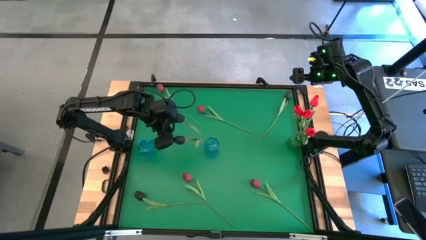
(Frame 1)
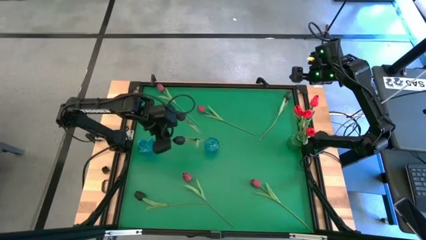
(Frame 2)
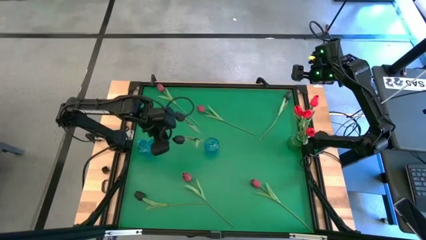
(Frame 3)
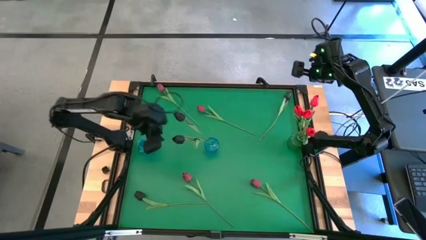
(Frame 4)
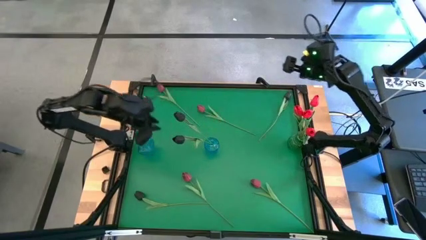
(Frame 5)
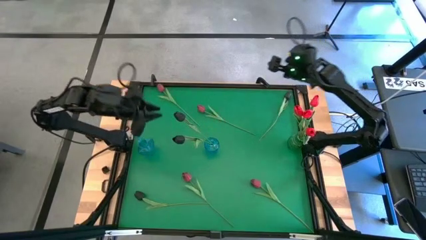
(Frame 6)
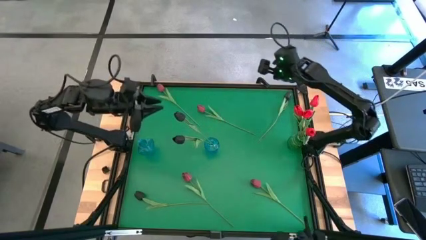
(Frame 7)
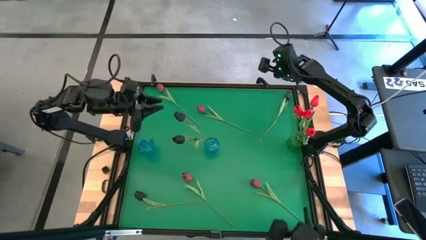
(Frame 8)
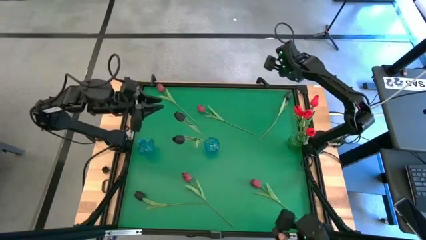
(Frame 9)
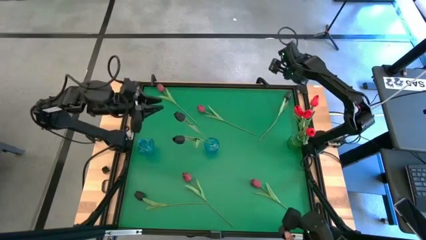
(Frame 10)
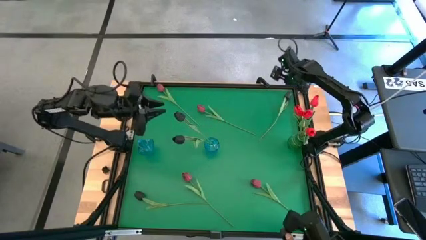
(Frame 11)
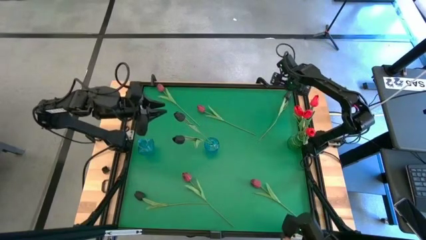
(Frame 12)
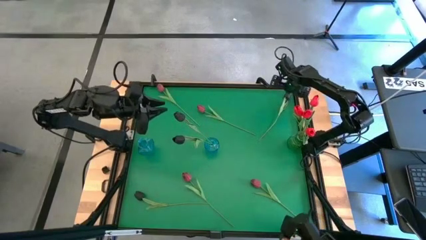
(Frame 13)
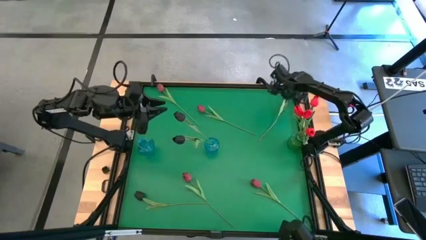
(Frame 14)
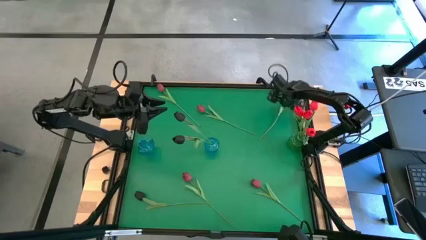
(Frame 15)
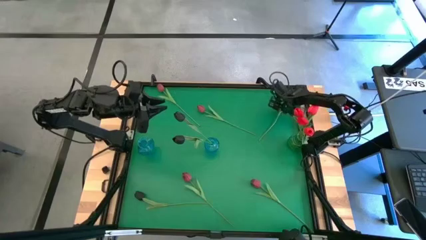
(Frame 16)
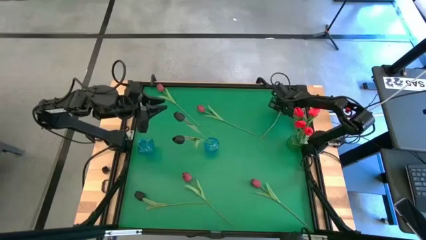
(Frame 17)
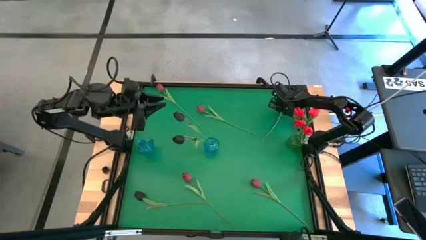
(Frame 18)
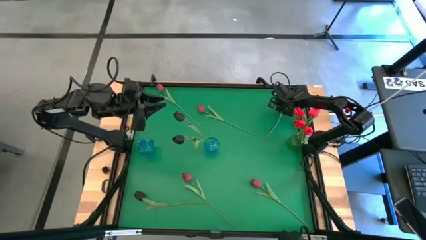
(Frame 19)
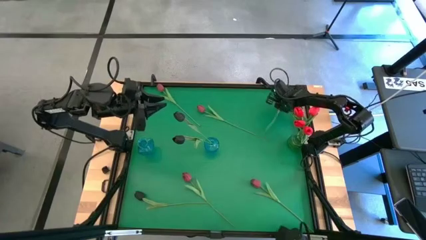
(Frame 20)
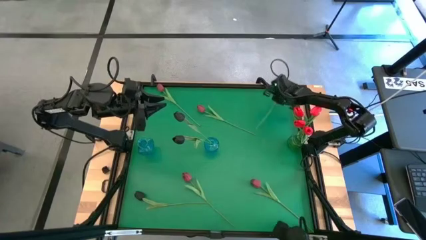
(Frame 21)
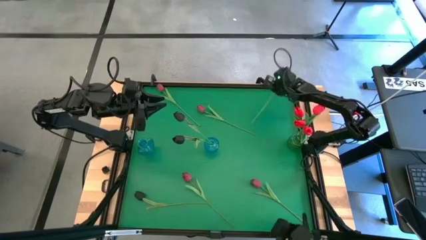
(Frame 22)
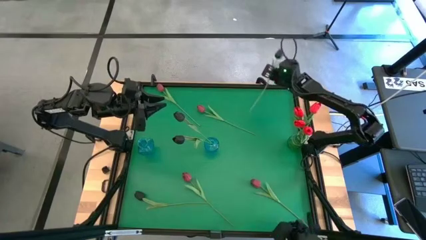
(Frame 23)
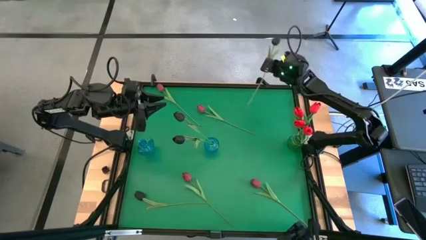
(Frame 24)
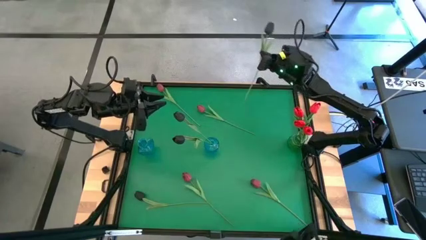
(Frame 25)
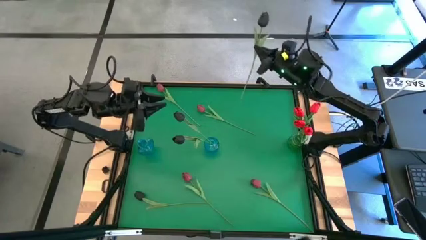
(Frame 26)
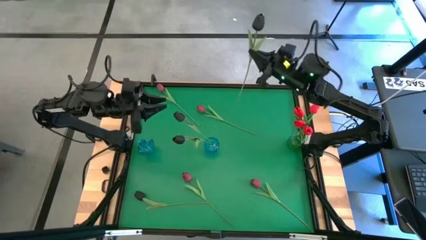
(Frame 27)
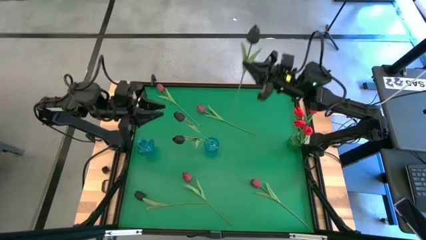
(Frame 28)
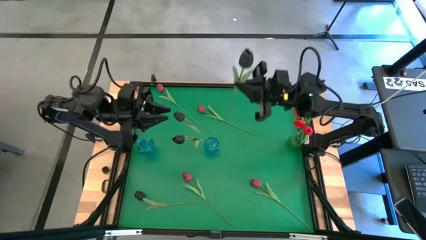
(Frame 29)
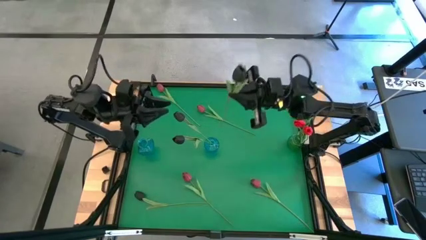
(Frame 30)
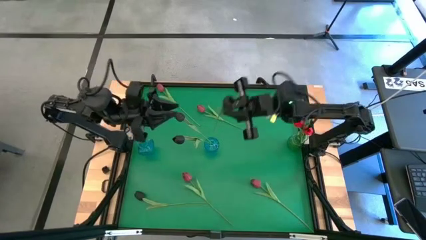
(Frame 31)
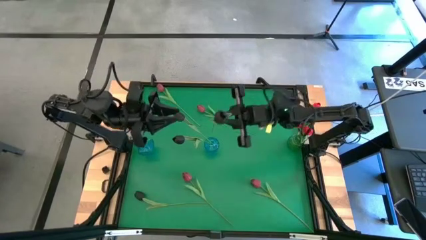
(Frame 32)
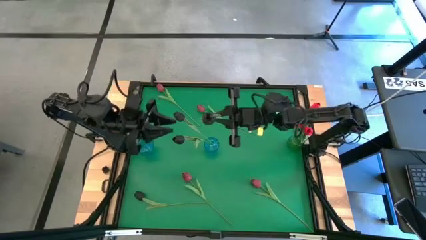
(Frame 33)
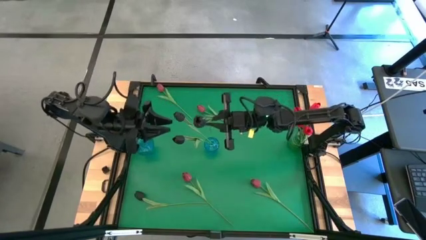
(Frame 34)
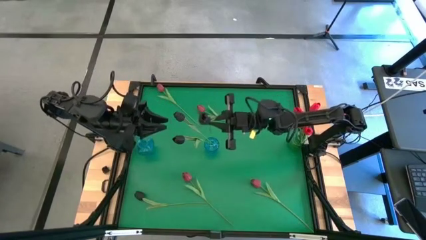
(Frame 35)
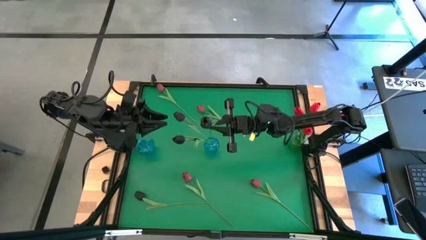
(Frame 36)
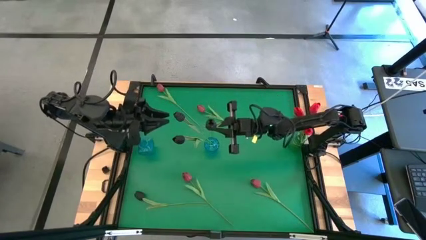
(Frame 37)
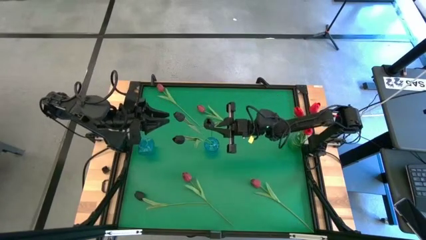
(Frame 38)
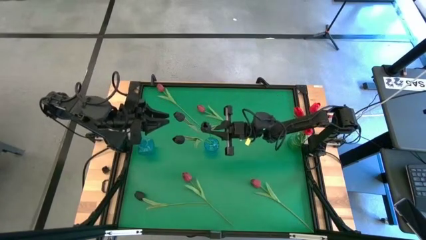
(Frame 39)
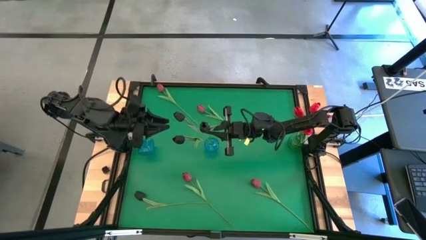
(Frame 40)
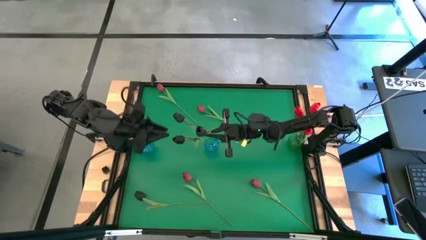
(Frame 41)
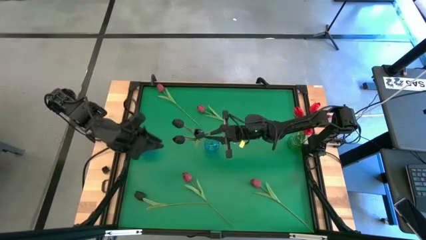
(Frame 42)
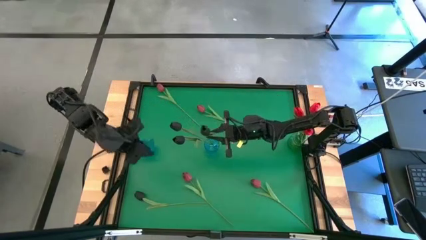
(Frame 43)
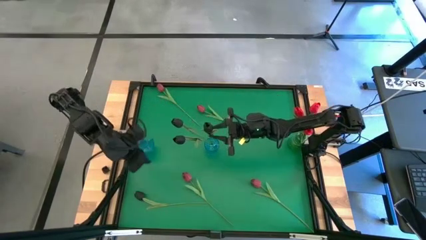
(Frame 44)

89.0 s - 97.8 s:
Task: Sort flowers into vase by color
Put the black flower into the right blue flower vase

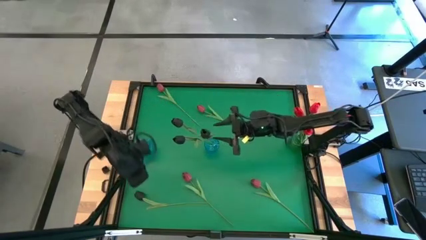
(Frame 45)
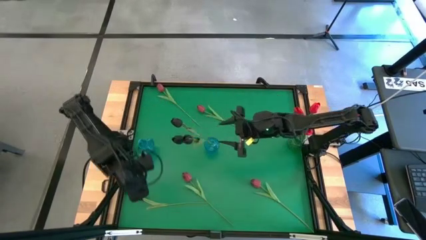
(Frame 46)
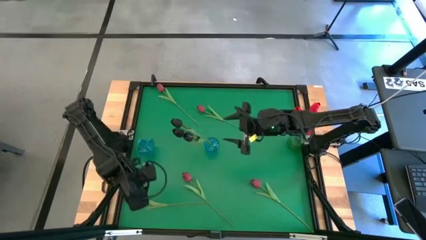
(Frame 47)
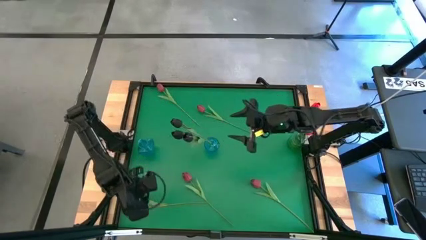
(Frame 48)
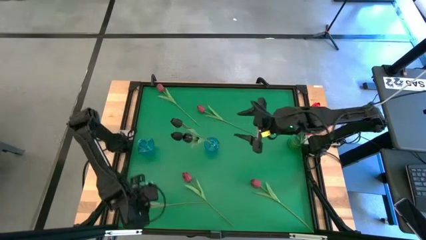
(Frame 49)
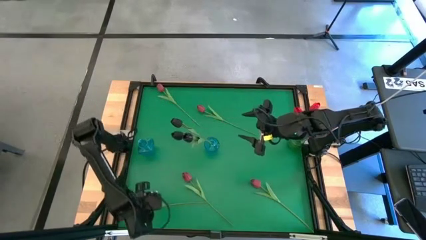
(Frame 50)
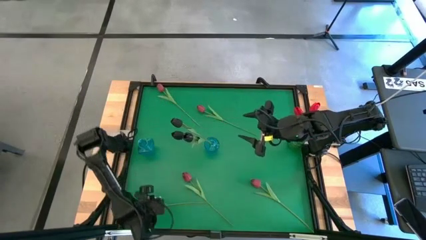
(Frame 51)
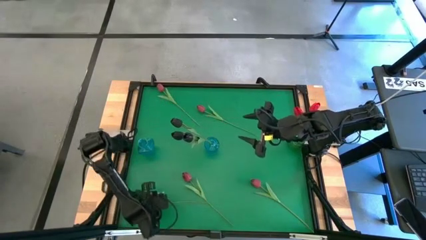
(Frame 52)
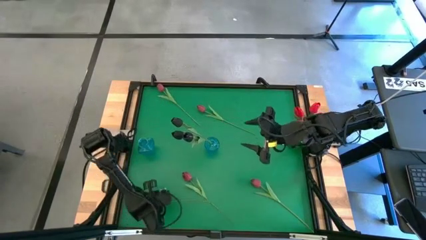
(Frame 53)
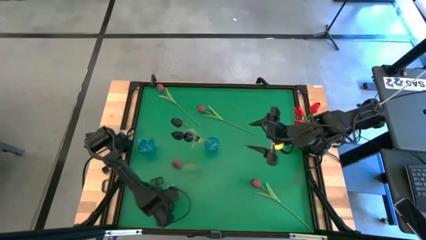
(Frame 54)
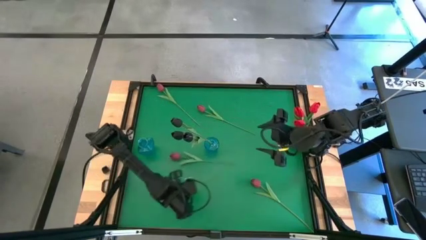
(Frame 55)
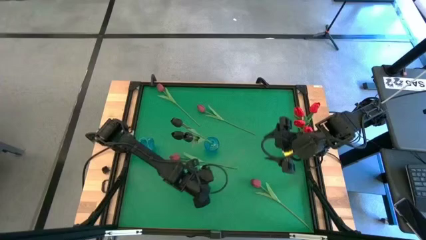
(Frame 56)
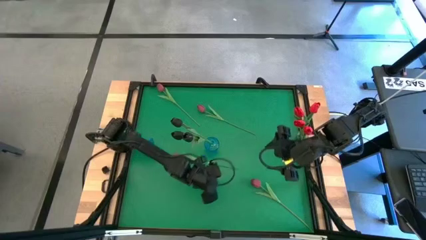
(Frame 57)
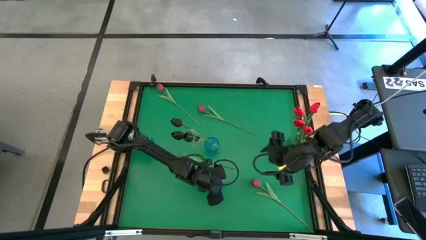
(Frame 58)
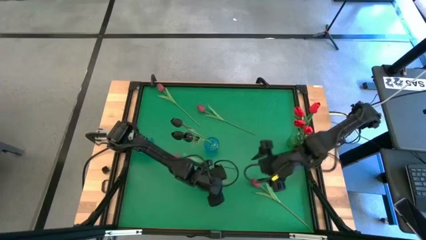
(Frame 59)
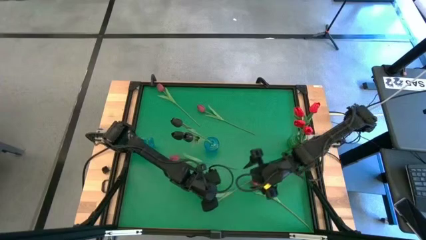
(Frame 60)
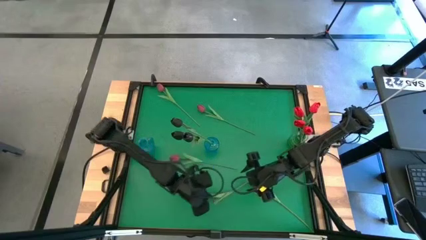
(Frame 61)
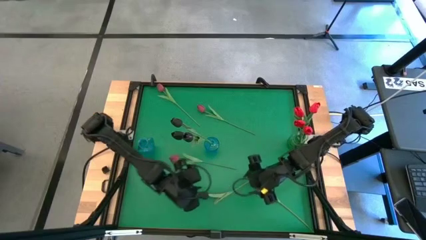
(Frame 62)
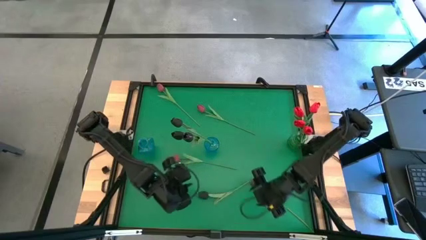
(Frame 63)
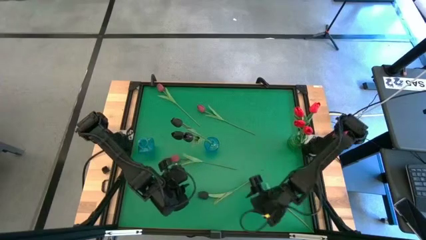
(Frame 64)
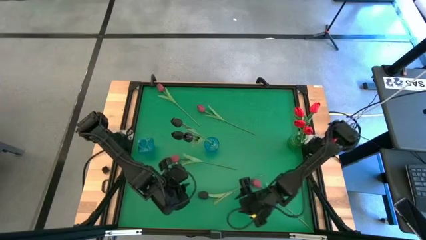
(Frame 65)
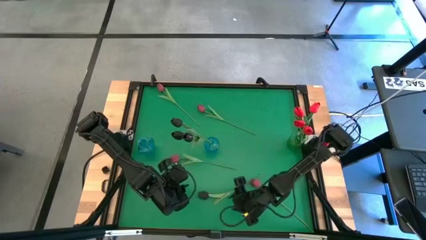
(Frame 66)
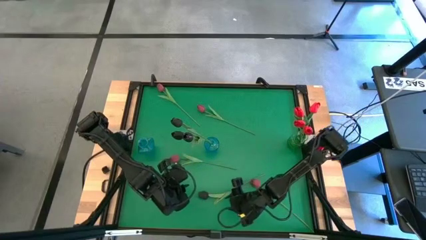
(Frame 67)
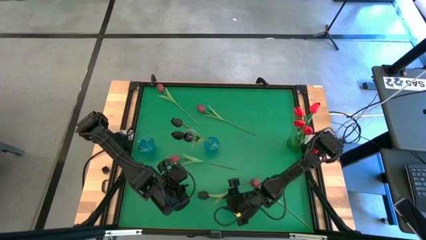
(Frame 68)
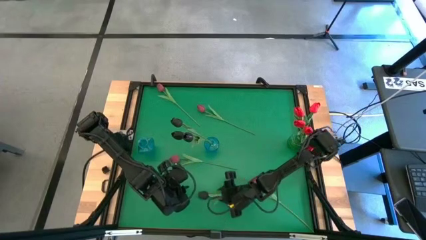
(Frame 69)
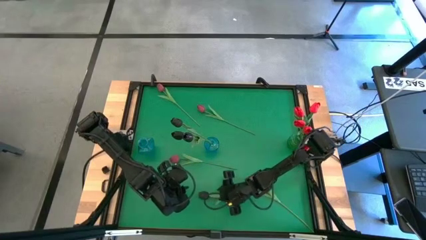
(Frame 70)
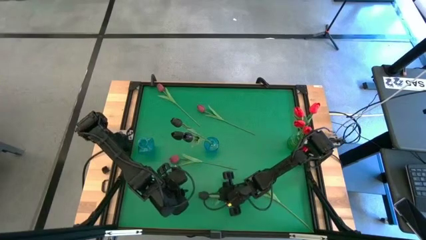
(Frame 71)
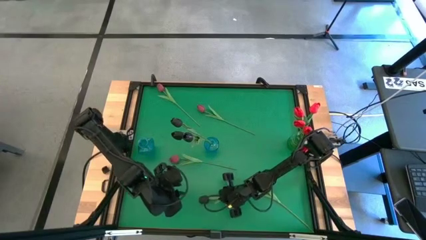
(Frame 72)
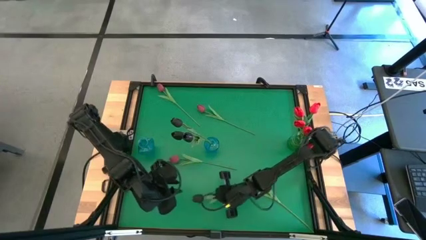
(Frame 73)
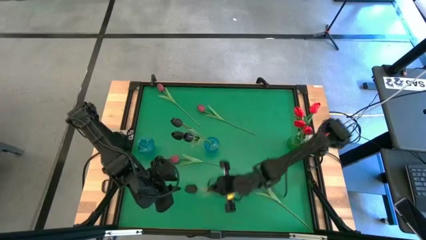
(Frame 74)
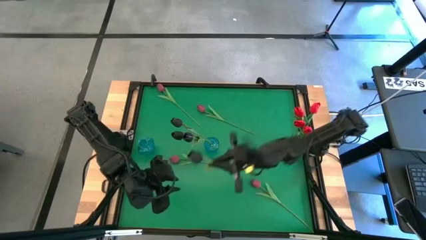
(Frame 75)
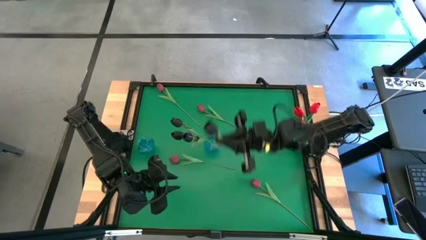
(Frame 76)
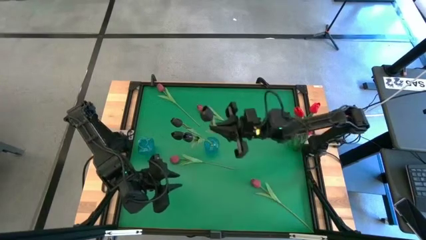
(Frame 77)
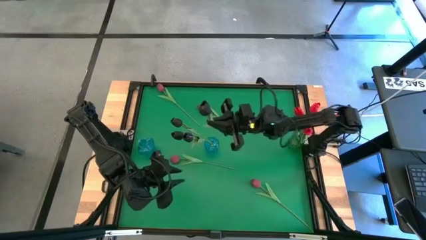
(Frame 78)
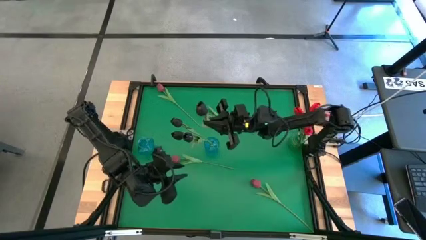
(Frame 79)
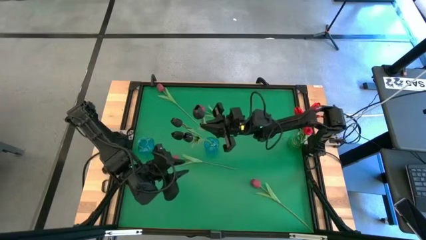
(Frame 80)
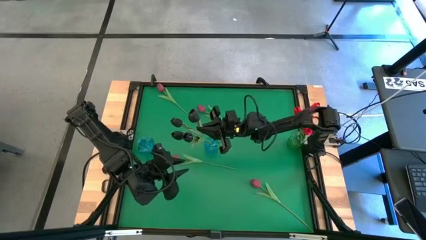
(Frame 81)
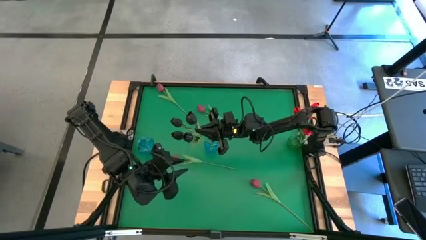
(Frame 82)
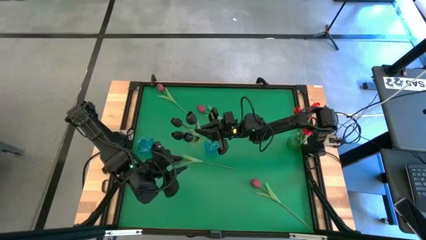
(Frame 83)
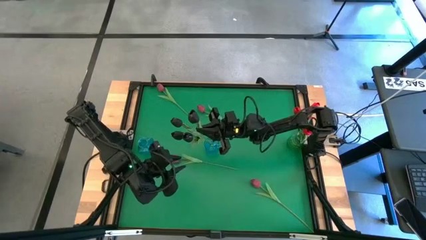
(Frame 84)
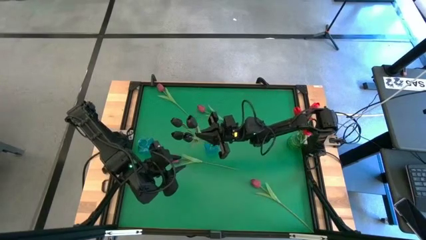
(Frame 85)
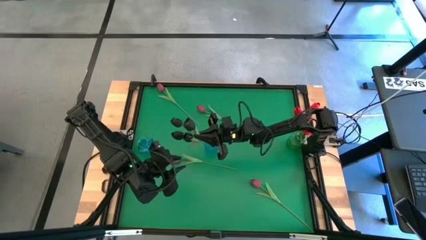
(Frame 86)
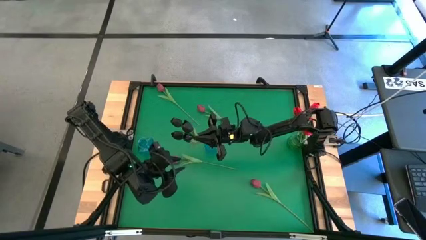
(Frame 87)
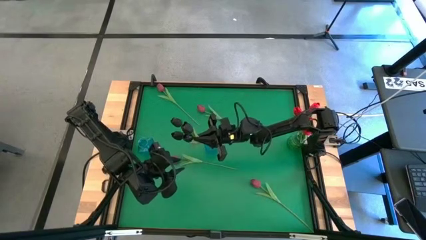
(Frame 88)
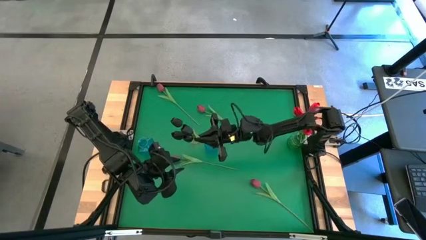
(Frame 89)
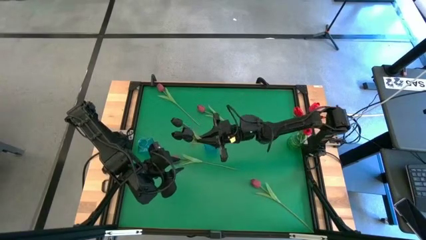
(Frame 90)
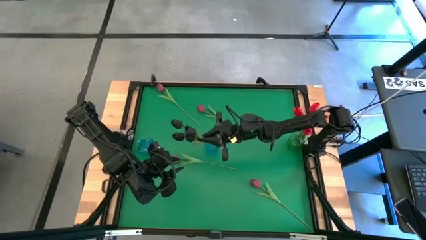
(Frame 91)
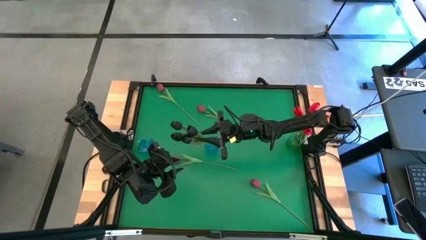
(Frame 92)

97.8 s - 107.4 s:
Put the black flower into the right blue flower vase
